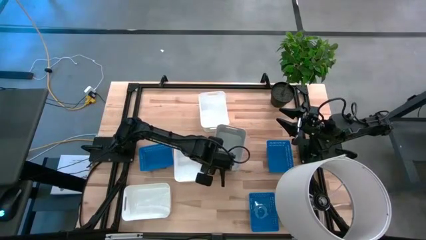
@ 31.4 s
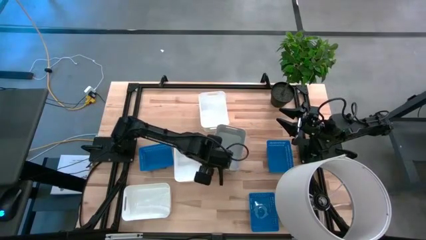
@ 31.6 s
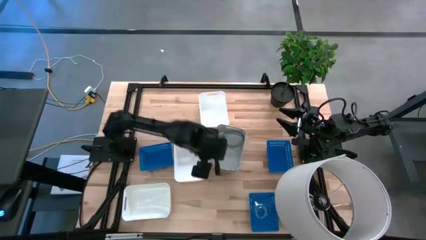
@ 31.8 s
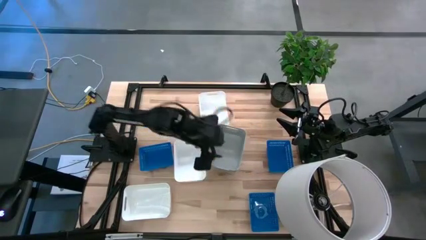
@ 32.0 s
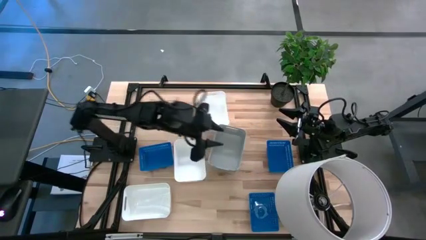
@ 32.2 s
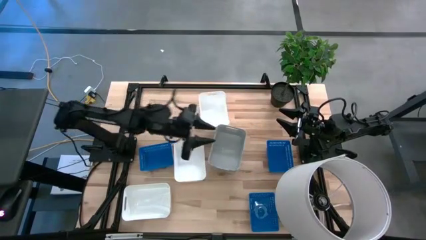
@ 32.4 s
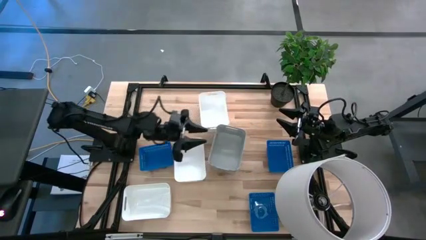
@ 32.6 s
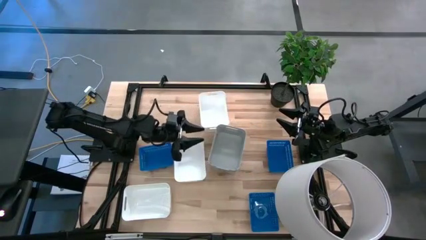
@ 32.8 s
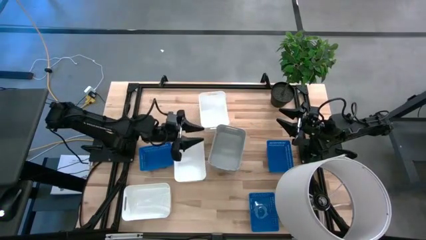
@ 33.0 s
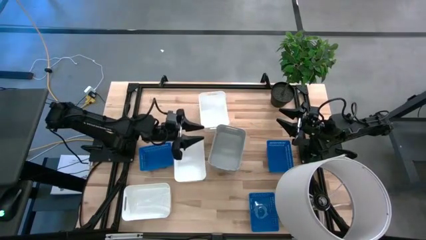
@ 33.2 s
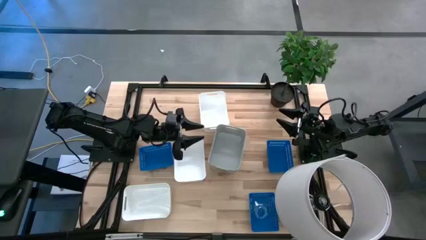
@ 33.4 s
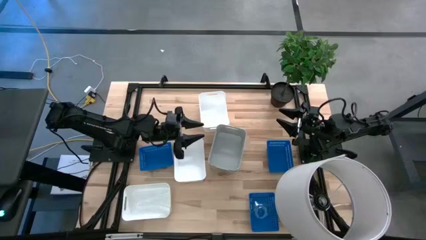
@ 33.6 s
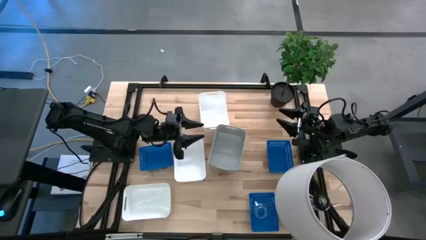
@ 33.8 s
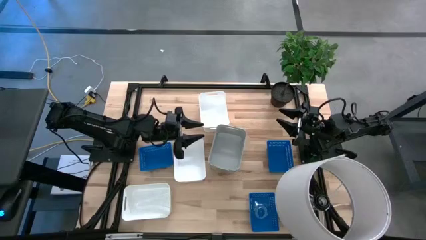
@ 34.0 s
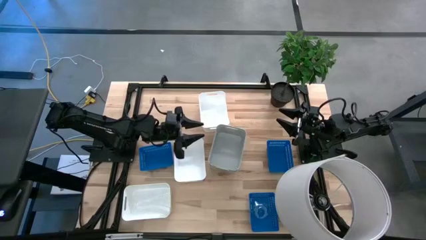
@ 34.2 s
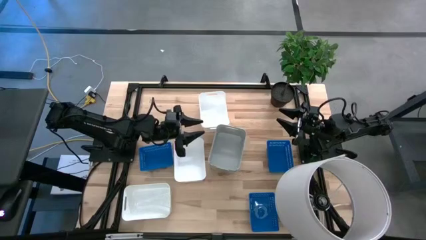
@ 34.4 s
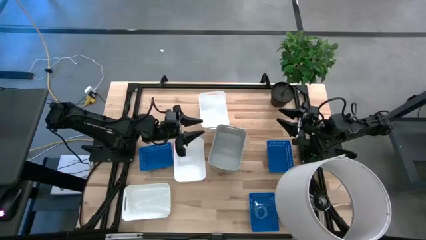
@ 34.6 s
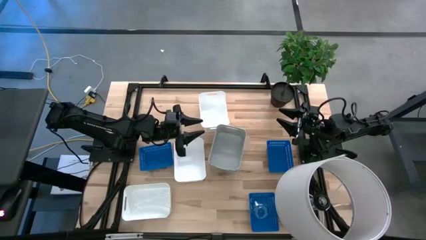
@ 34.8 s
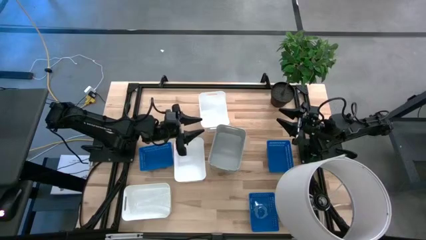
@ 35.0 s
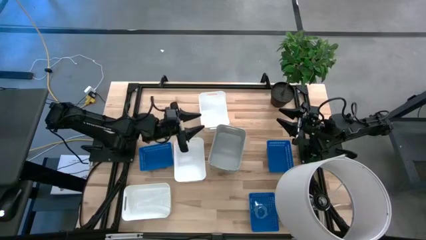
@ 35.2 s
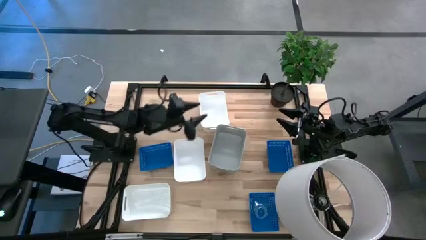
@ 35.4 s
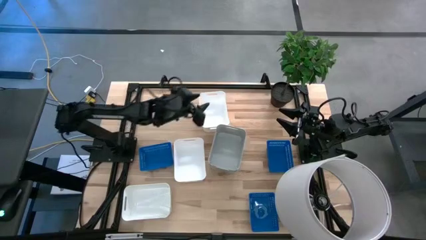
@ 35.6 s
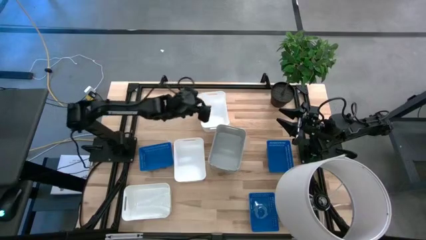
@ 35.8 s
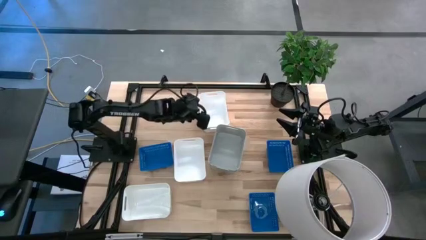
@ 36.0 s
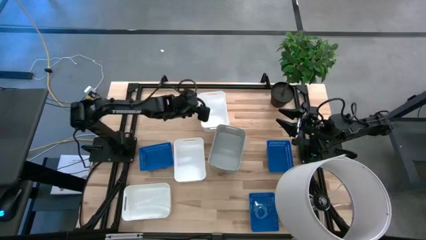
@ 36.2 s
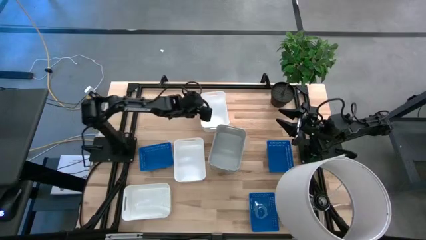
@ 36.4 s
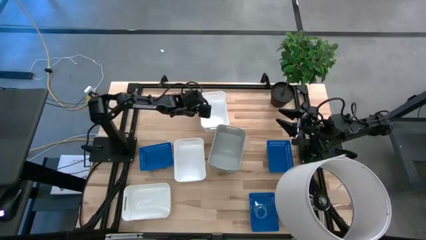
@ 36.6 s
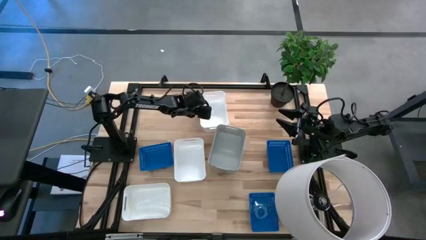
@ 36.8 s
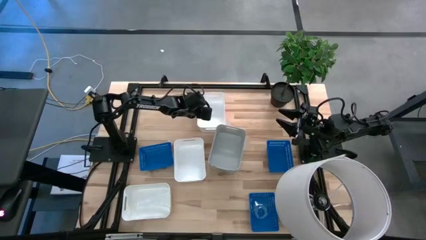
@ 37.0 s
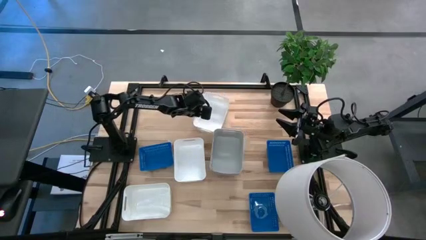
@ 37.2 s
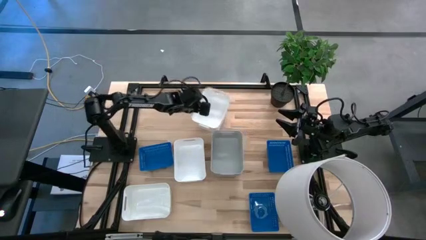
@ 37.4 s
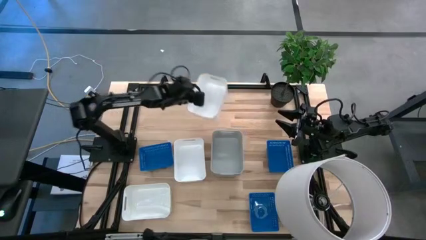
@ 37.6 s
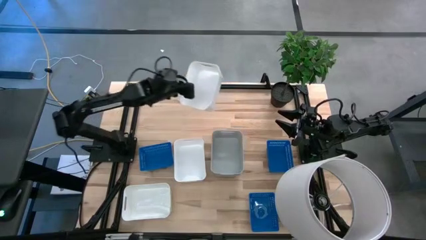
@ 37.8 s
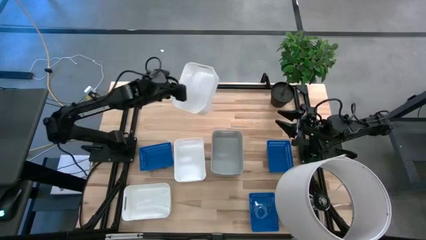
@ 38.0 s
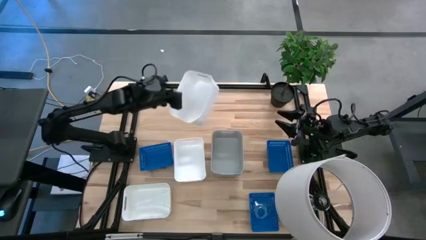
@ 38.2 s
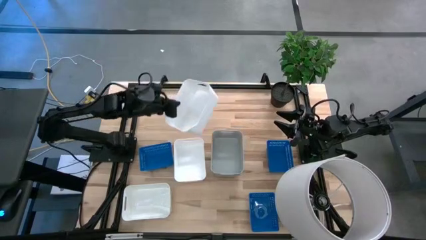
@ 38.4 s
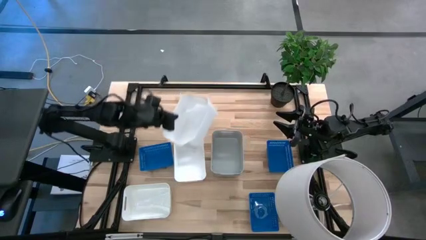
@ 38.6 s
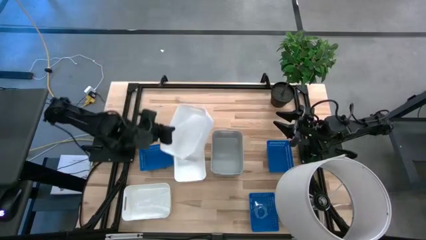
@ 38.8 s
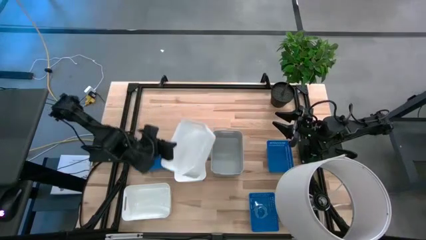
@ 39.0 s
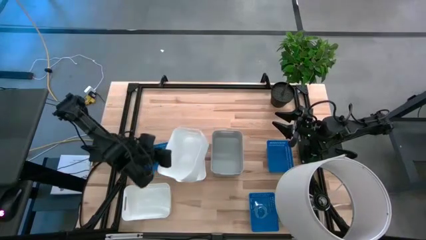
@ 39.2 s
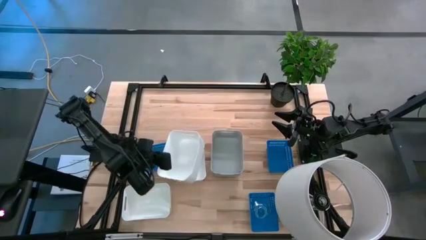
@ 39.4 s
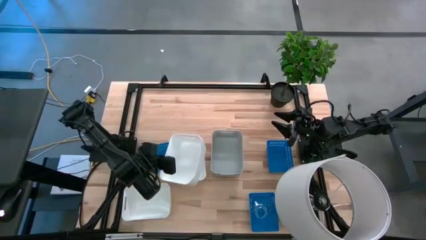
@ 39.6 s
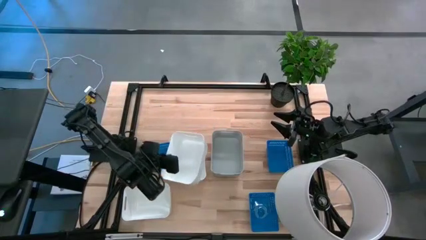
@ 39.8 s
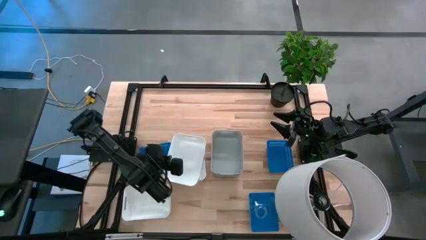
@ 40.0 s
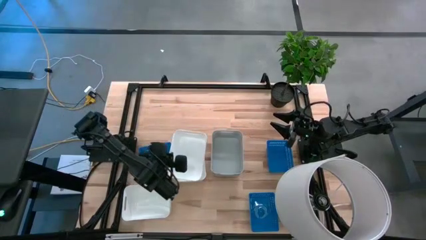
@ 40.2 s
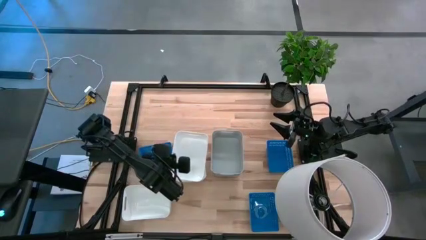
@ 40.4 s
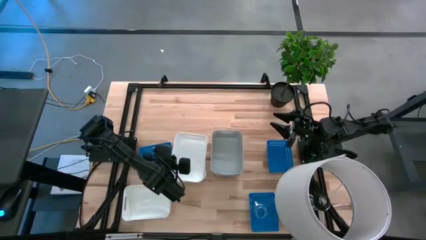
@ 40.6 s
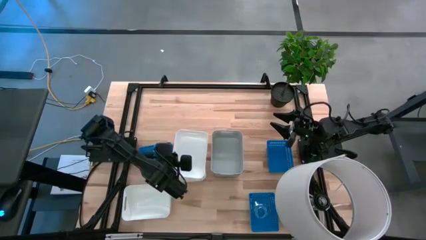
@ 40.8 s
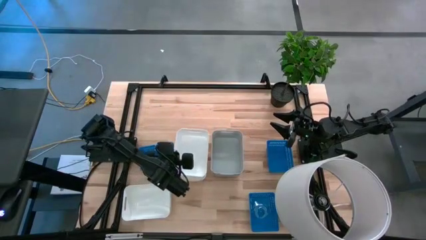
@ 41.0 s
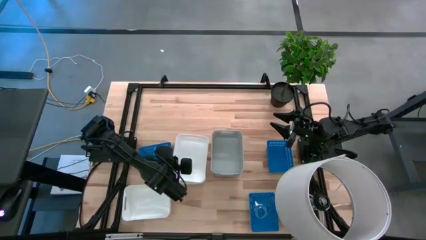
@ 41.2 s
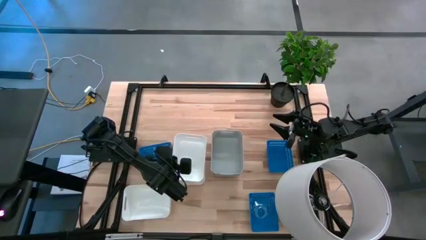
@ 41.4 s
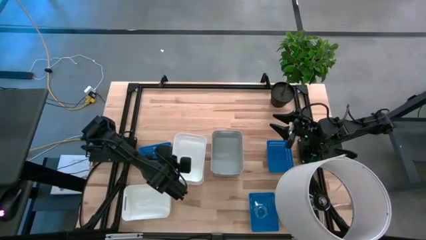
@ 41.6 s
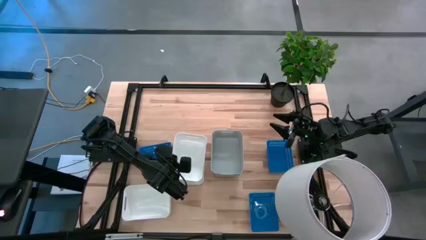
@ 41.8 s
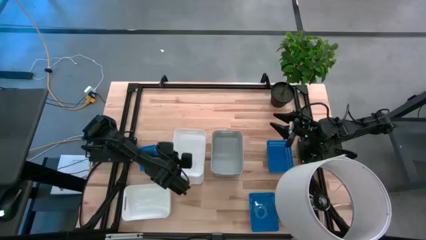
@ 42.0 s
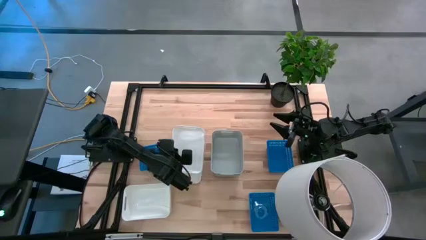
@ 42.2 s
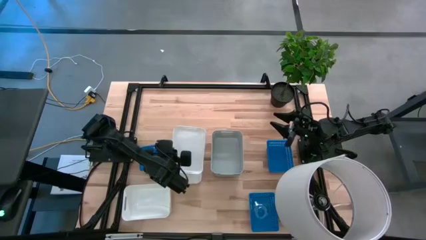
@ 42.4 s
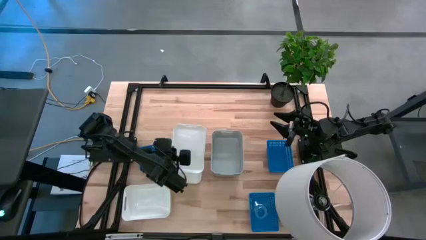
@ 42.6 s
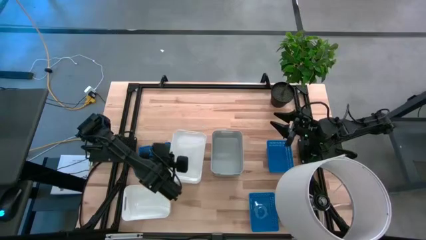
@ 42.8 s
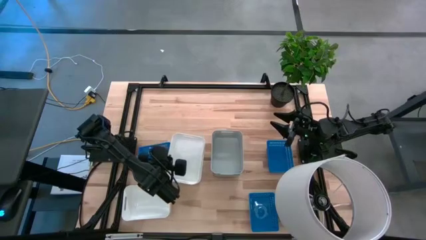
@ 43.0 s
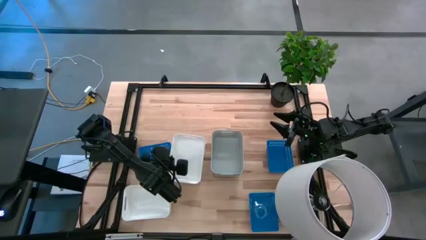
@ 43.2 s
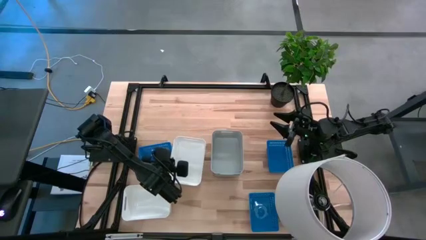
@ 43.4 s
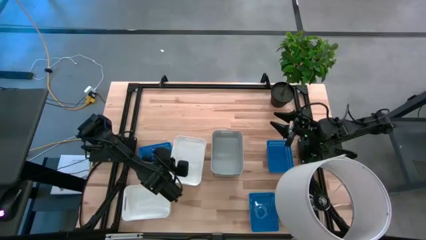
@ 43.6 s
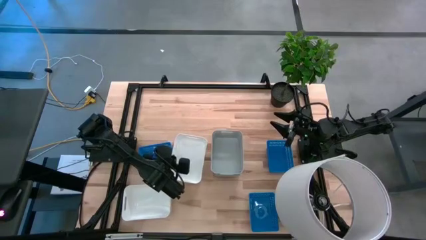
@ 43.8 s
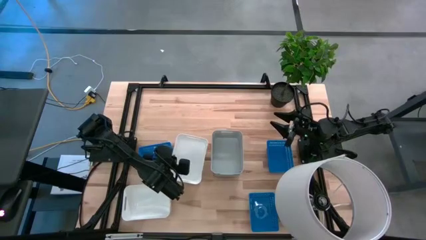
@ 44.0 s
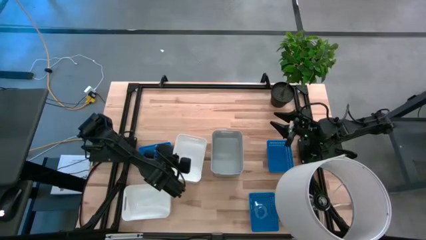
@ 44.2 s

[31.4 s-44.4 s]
Stack the top middle white bin on top of the other middle white bin

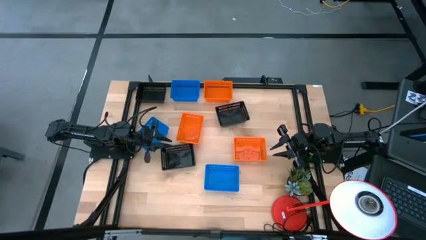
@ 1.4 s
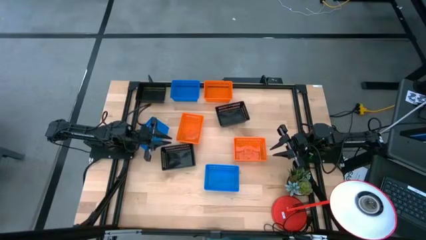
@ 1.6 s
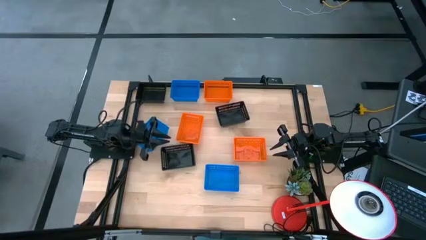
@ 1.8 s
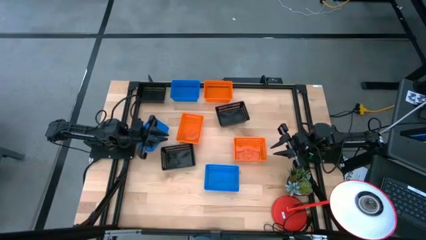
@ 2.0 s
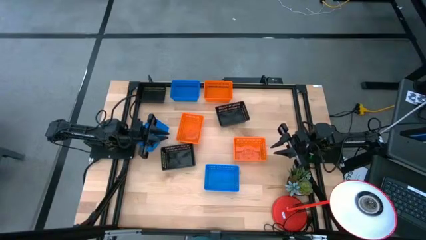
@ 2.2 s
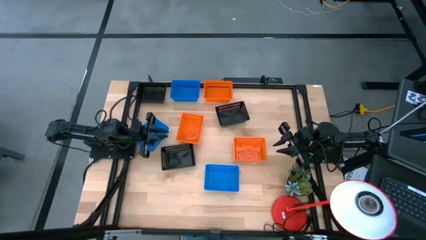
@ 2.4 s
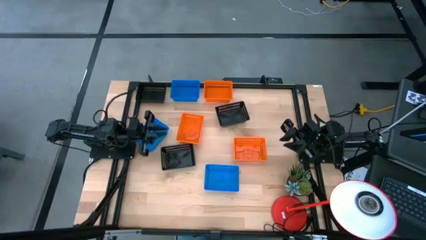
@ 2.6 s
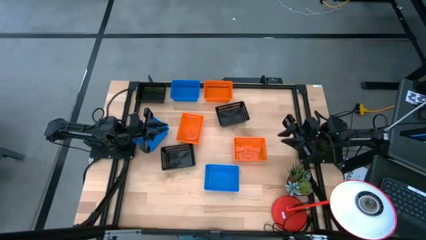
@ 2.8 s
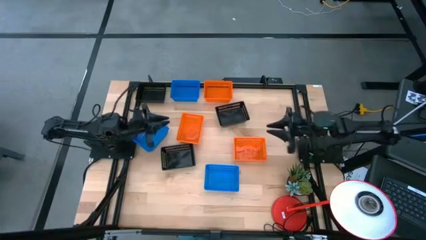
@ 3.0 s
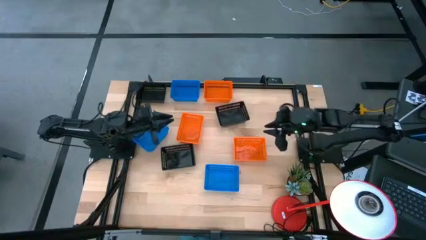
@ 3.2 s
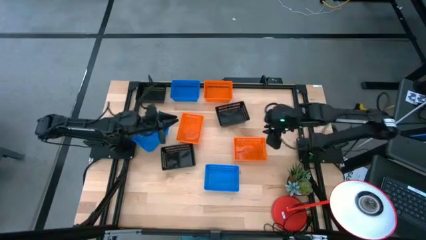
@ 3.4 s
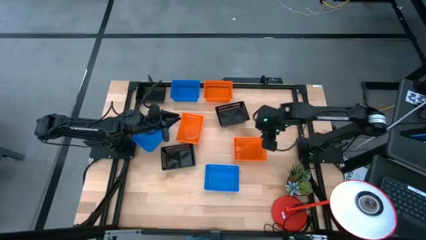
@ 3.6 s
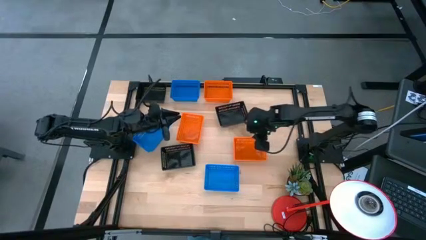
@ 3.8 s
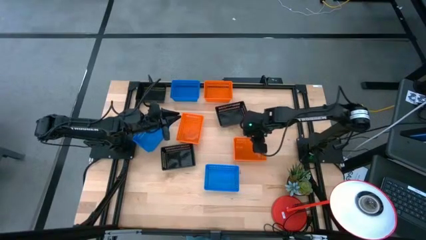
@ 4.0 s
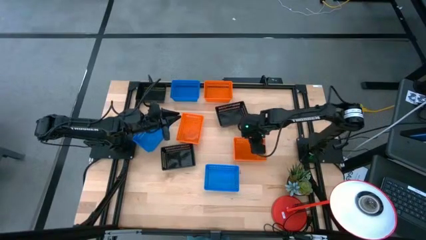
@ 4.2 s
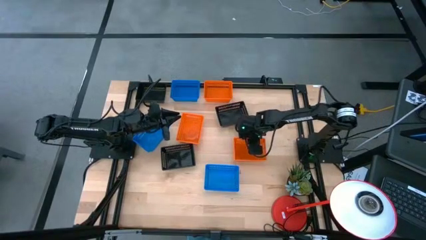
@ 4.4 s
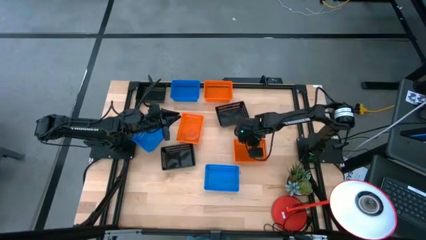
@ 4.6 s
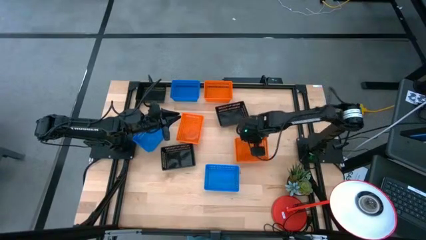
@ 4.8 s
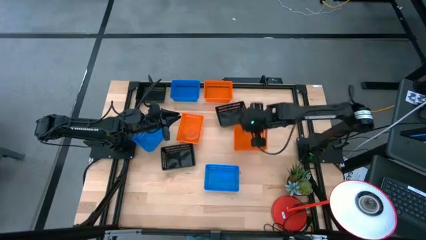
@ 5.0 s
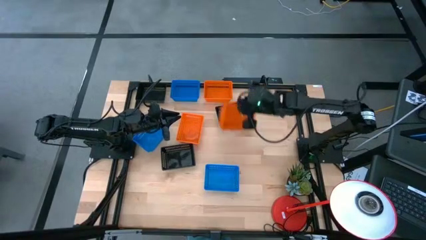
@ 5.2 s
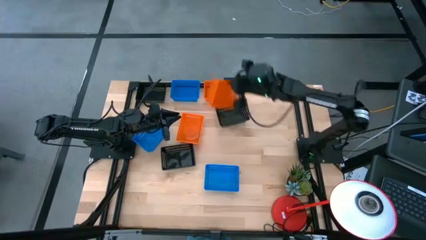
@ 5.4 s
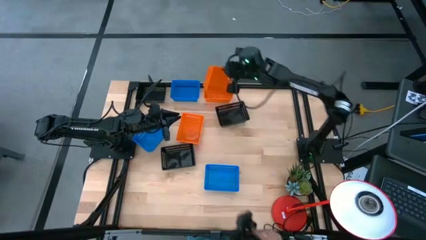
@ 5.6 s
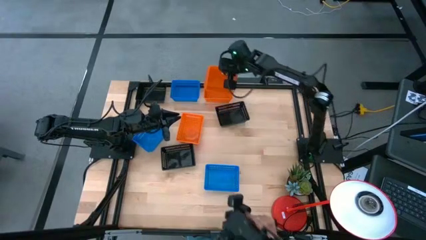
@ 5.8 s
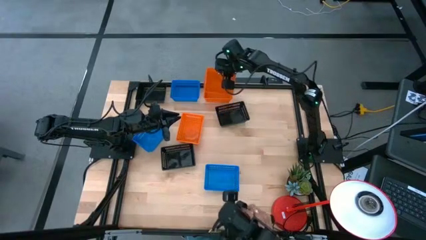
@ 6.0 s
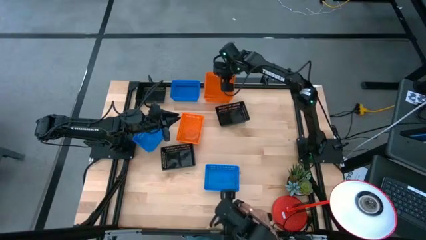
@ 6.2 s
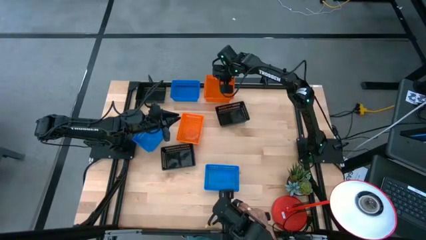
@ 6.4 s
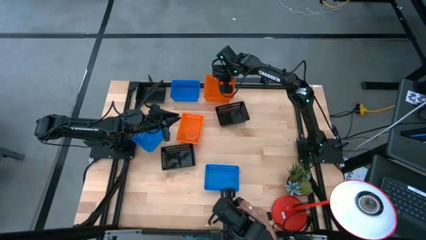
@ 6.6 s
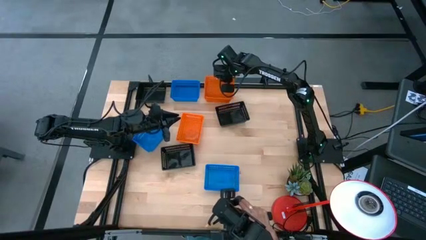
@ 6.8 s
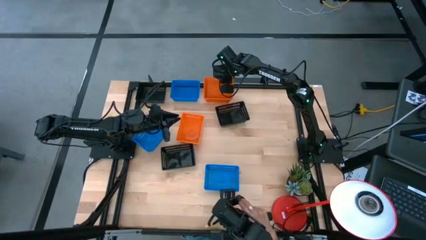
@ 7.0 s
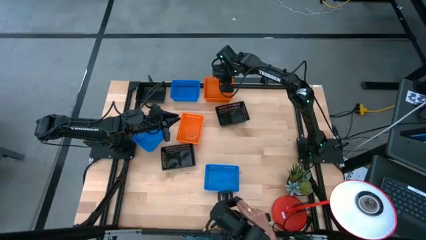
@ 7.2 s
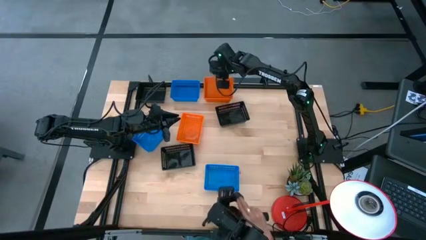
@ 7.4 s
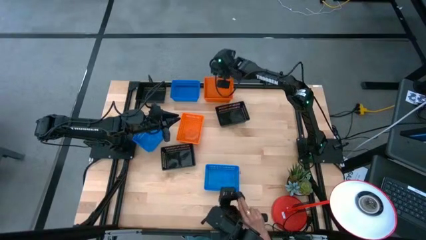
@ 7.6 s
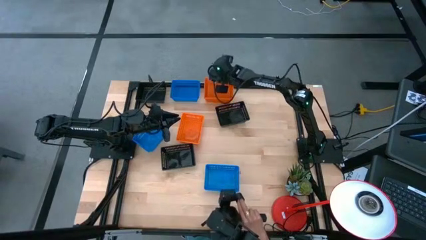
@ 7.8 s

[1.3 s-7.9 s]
Stack the bottom orange bin on the top orange bin
